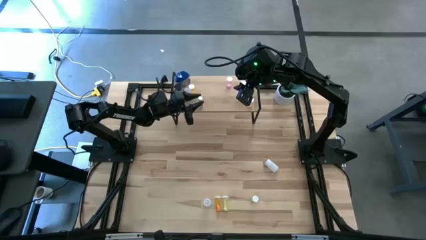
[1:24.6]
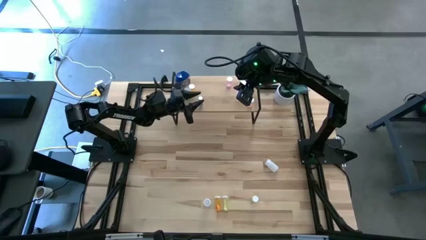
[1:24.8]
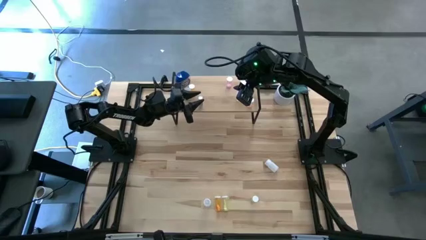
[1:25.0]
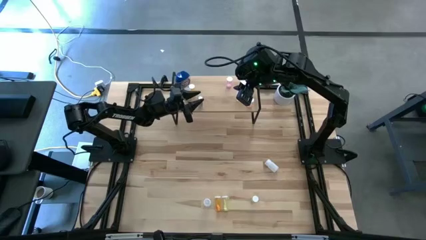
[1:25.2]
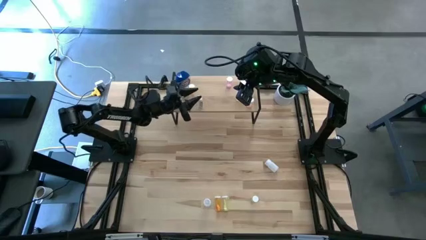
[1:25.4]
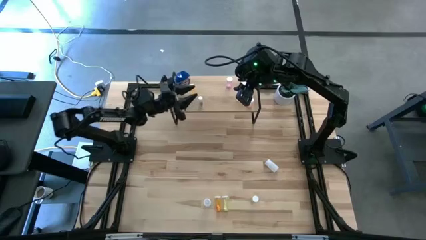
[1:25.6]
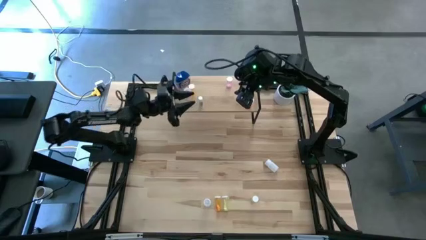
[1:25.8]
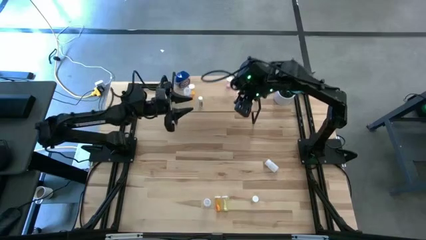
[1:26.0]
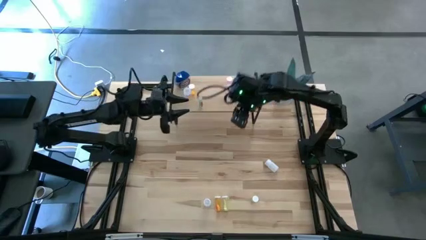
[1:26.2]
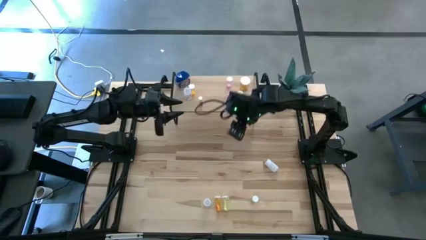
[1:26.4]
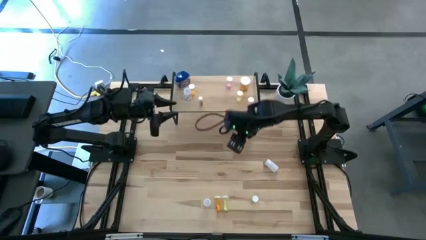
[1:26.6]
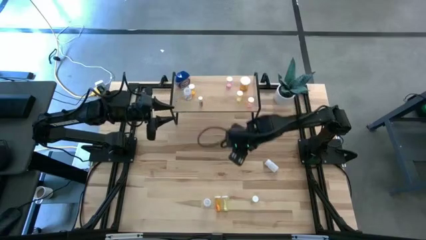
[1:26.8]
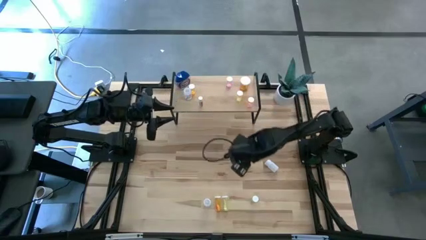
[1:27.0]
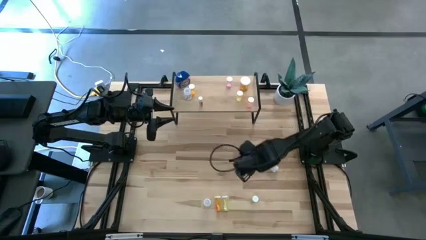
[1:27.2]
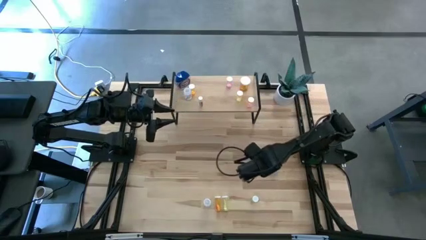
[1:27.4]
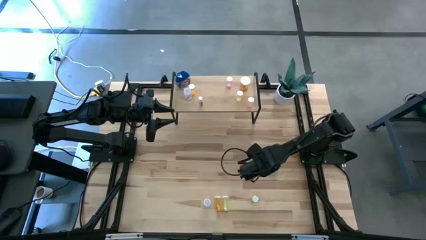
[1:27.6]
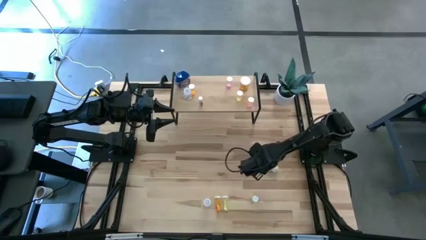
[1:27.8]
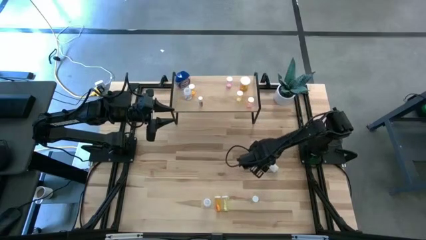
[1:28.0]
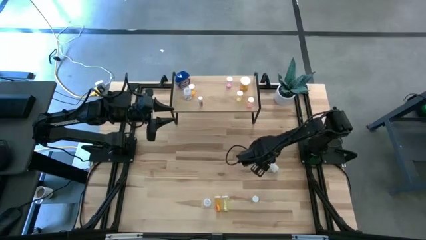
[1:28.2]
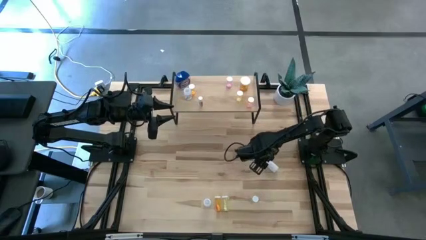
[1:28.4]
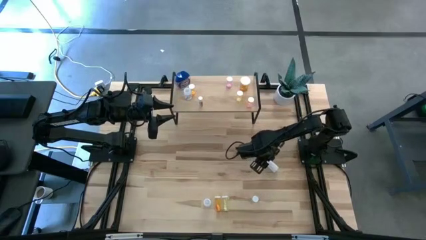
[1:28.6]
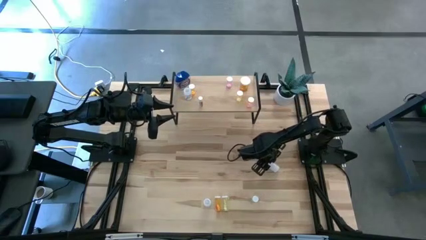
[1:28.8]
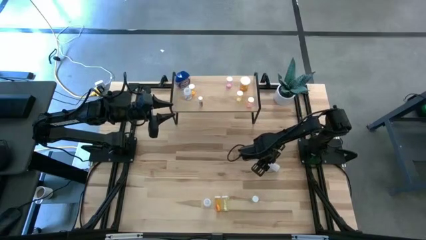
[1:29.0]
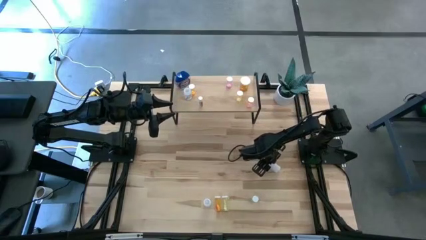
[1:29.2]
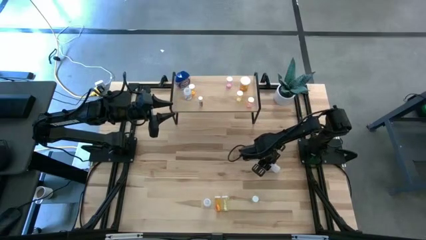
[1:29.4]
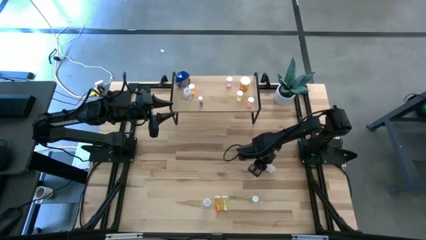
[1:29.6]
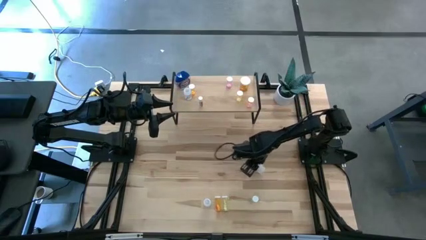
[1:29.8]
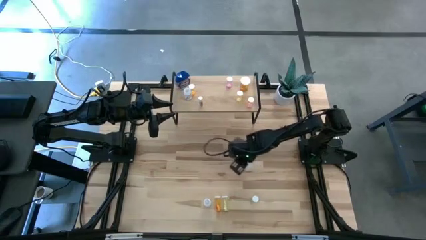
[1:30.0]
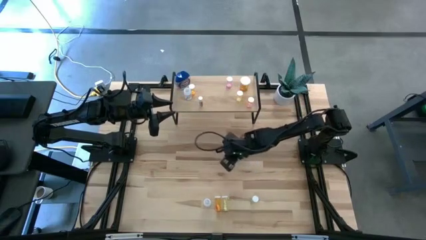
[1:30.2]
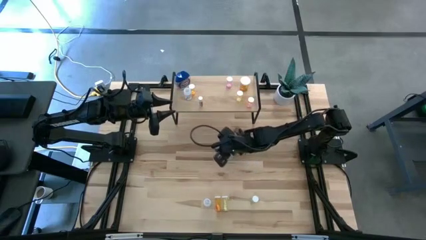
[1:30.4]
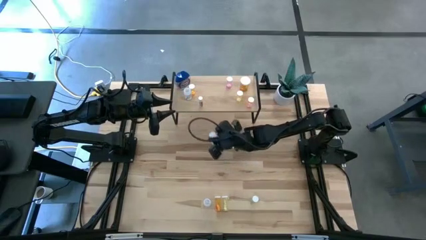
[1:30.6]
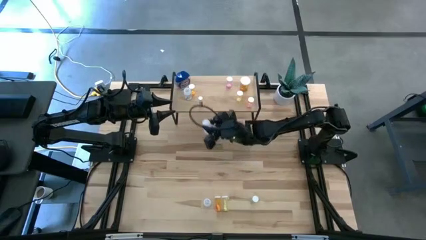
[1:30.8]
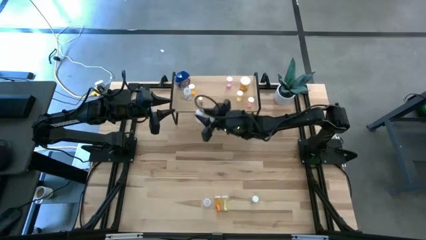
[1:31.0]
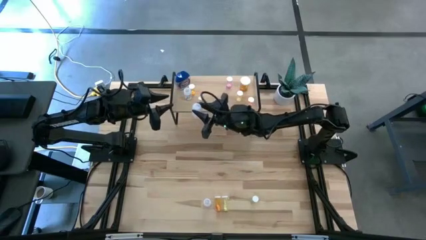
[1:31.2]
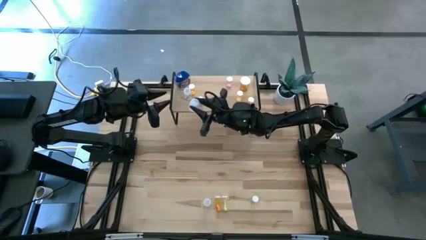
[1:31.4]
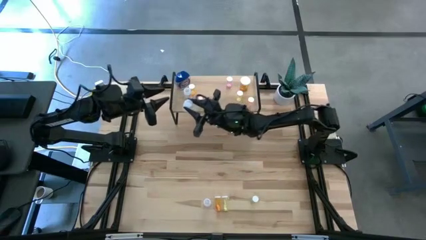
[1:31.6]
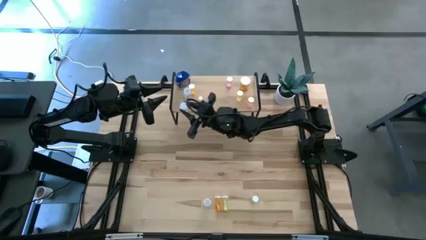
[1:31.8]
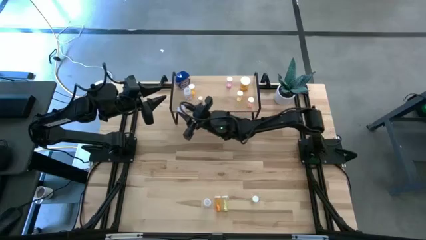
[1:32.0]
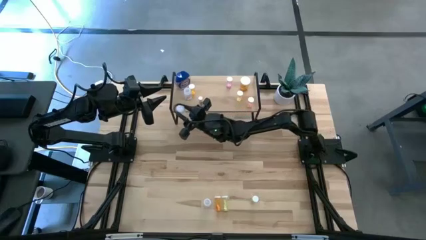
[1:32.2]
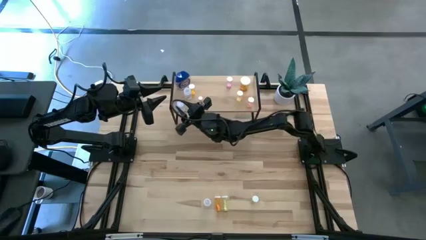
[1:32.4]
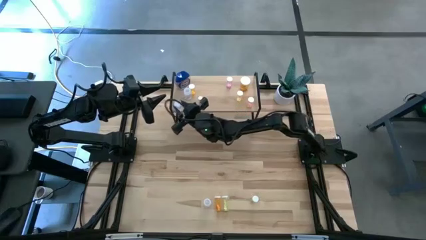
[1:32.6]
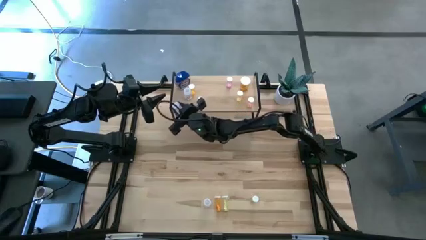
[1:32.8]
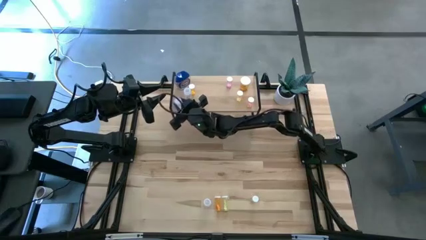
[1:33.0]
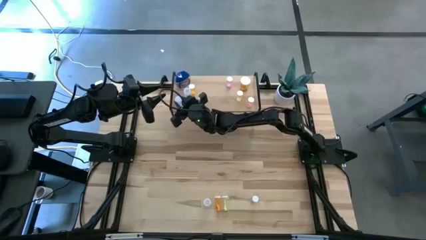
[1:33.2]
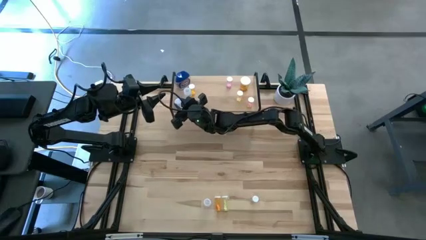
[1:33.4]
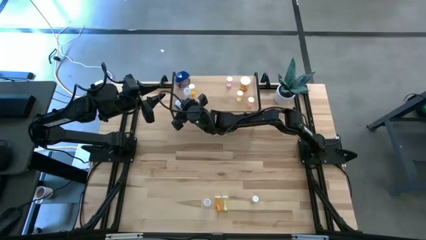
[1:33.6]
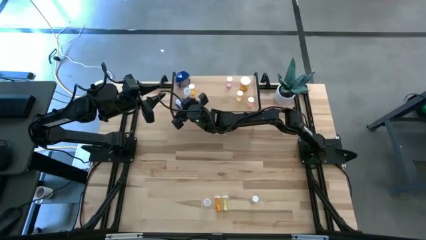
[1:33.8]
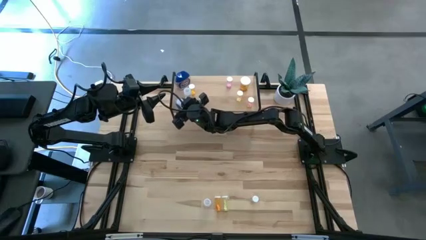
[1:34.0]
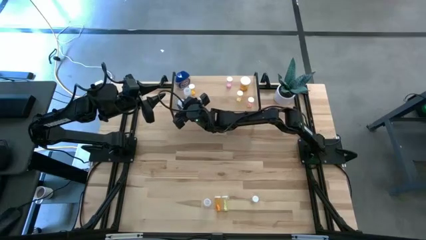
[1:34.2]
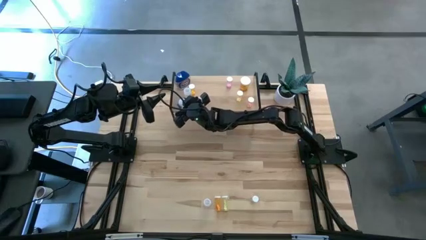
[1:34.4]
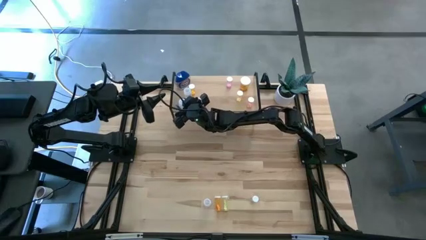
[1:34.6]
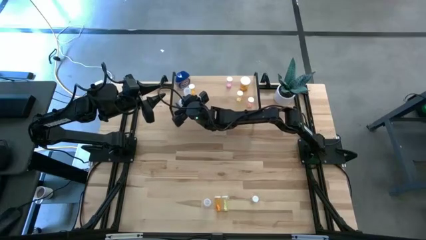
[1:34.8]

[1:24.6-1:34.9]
Task: Pick and place medicine bottles onto shelf by color
Put the top big white pill bottle on the shelf

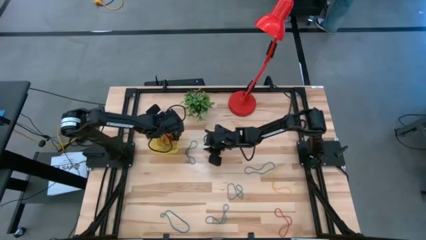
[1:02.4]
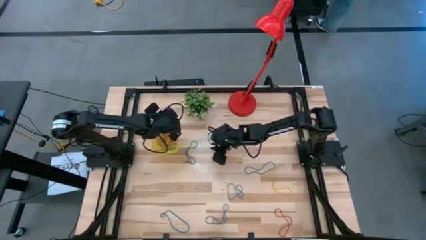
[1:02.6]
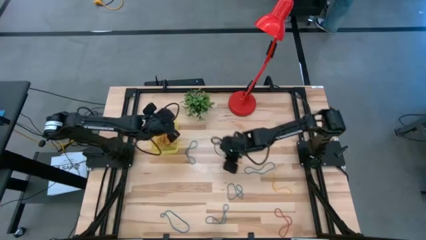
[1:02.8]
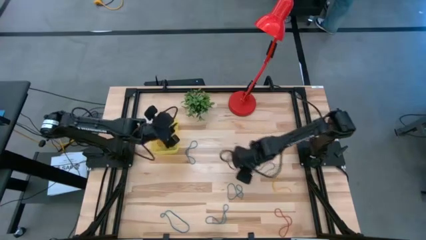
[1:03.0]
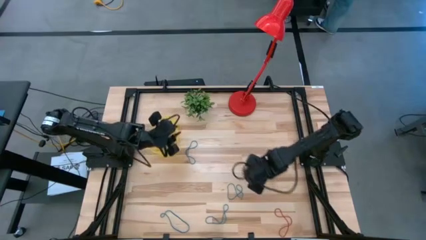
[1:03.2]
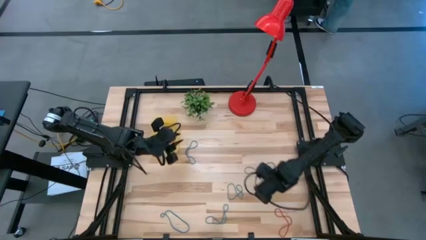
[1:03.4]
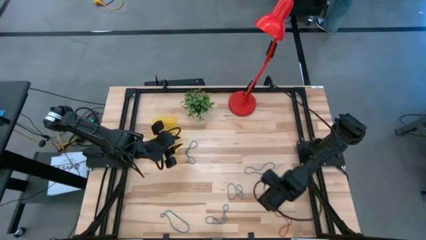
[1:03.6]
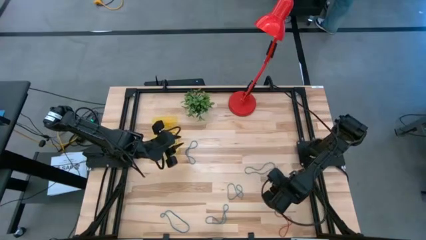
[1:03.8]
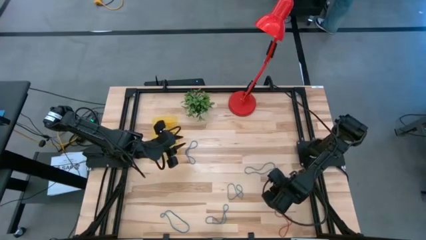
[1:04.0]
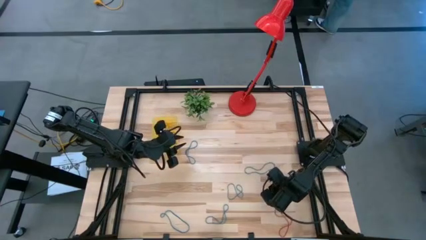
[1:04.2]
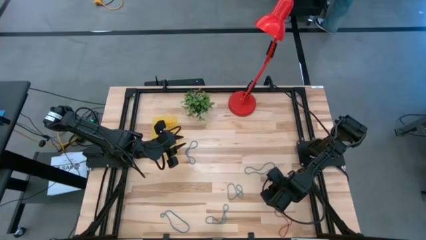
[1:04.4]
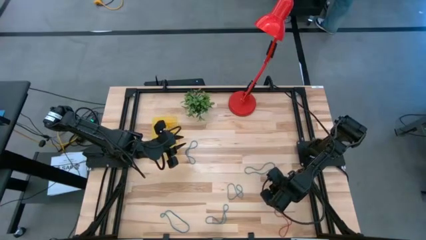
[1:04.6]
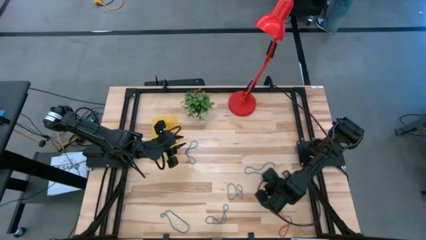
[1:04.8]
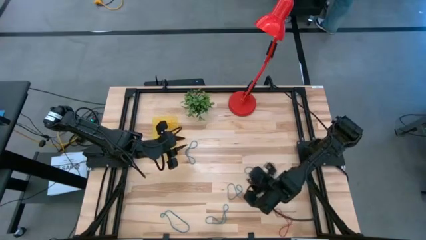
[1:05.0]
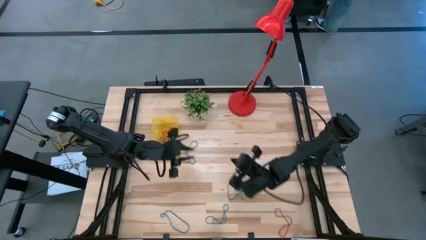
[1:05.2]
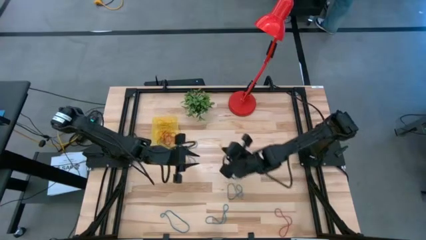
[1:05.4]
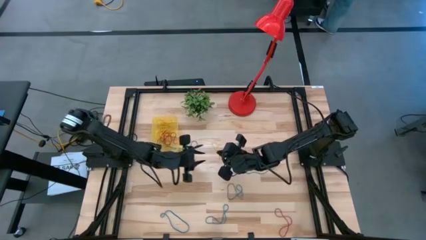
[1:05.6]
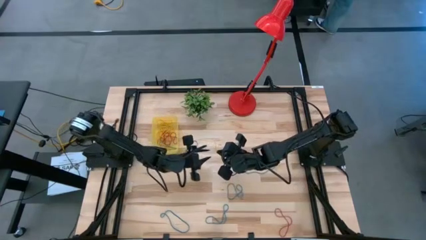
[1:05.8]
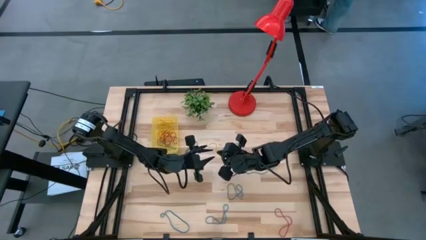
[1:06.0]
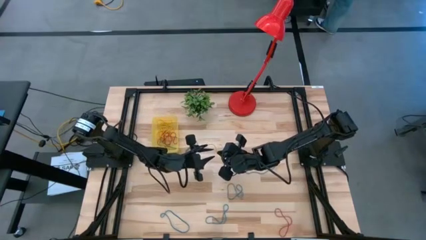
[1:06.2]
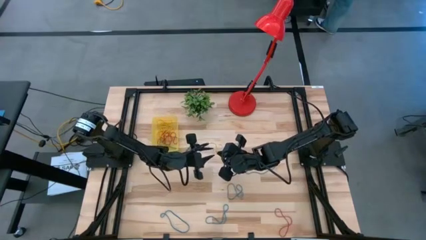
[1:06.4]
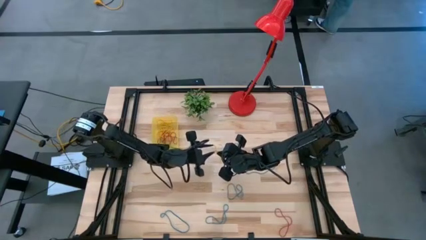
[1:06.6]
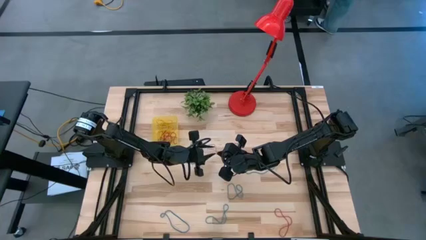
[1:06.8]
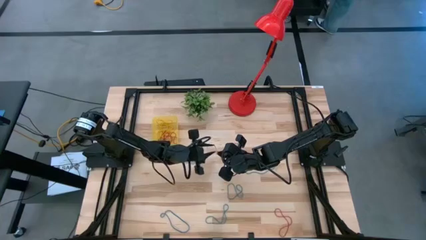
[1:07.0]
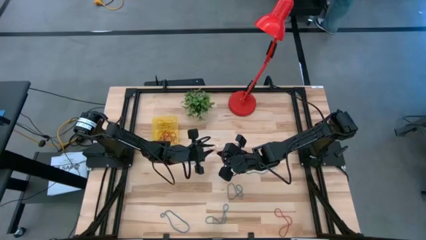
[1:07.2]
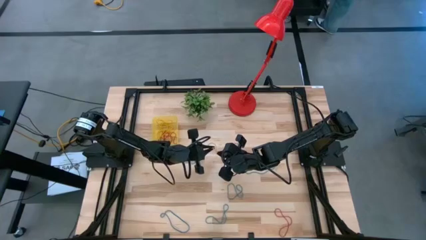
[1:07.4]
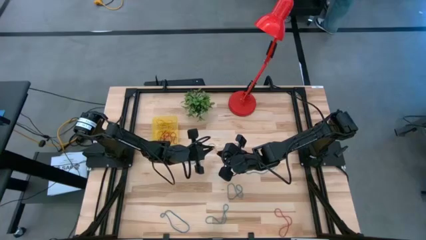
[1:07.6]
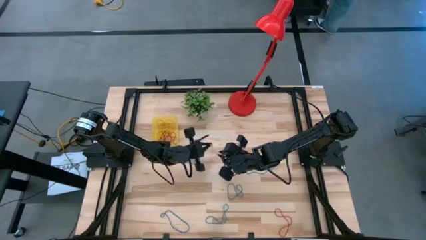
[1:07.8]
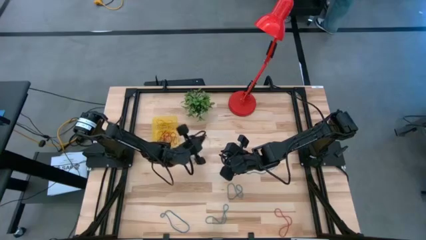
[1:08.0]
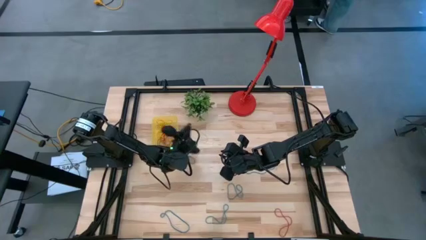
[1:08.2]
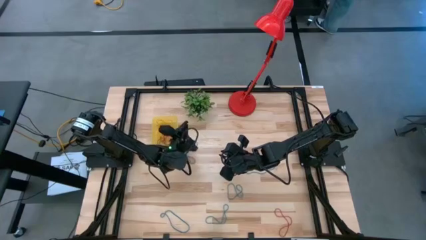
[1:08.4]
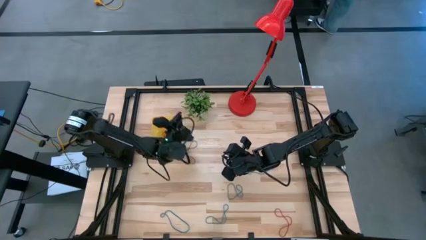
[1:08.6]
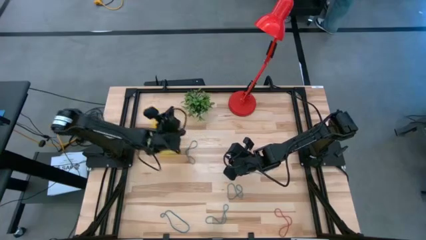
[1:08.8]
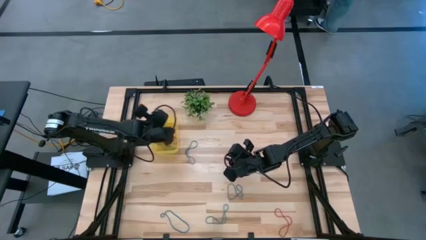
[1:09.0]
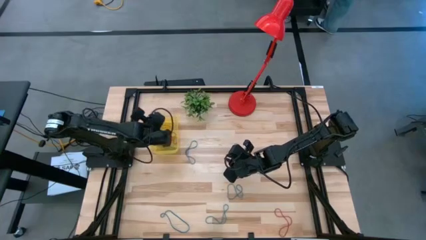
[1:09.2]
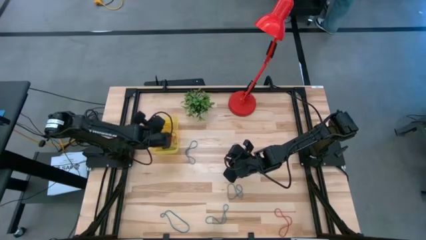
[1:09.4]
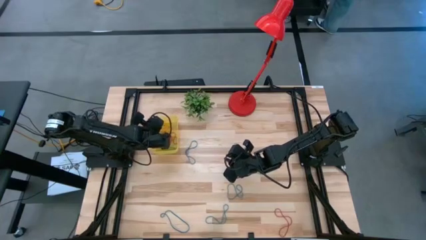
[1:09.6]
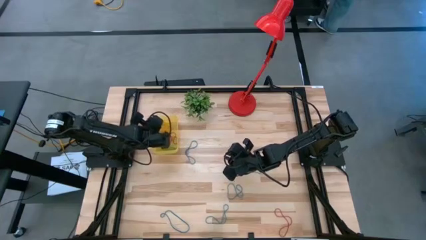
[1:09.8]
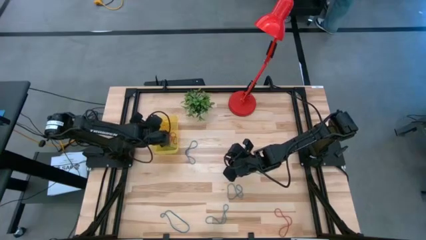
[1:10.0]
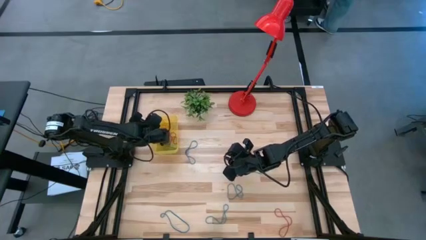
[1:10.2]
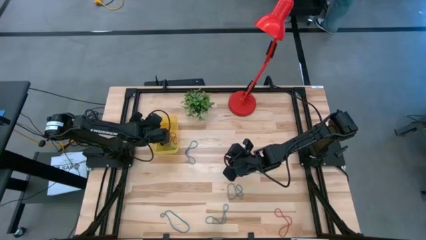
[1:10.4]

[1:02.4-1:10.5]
Task: Pick and place items into bin
Put the yellow rubber band into the yellow bin
